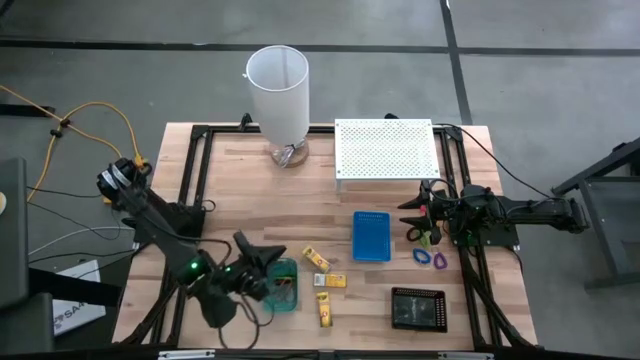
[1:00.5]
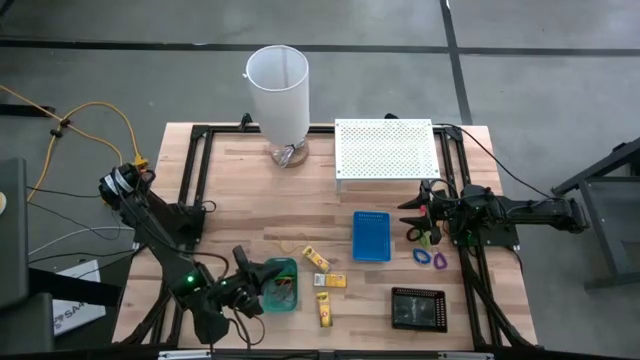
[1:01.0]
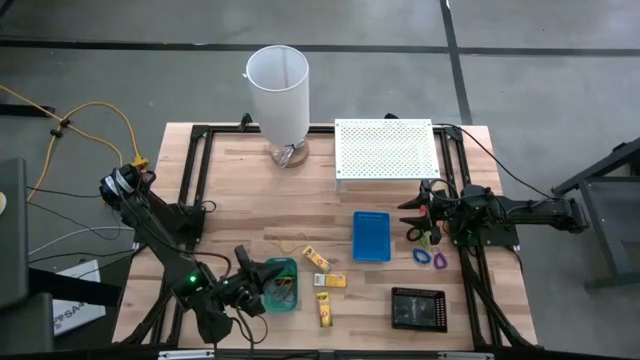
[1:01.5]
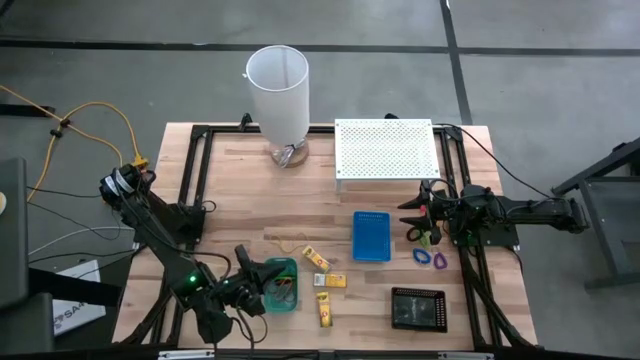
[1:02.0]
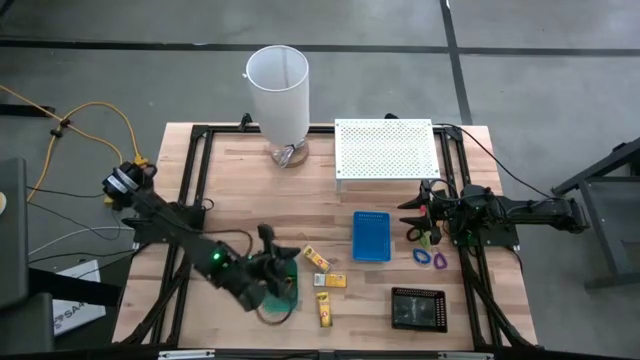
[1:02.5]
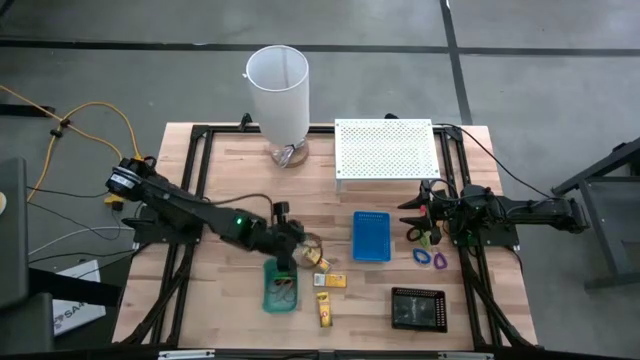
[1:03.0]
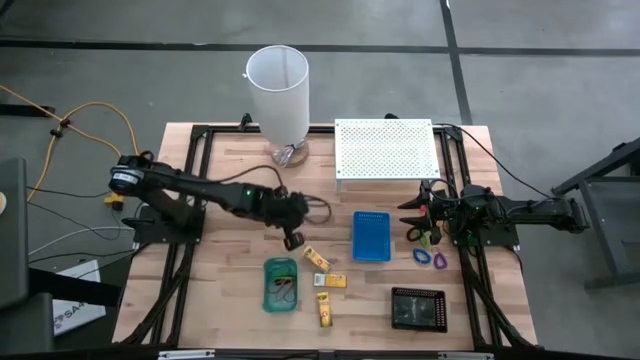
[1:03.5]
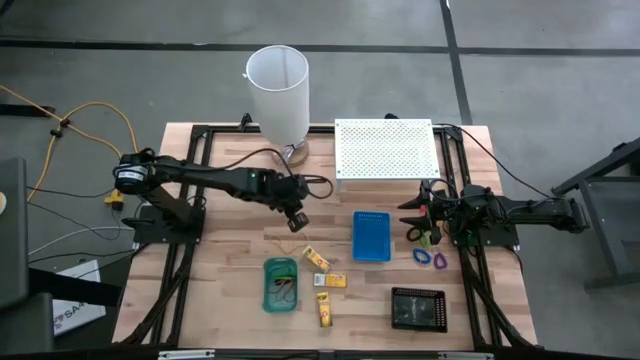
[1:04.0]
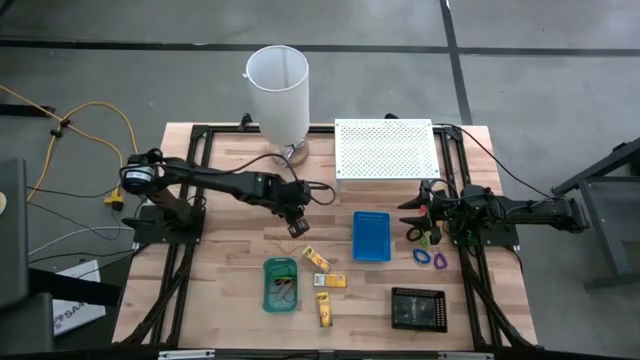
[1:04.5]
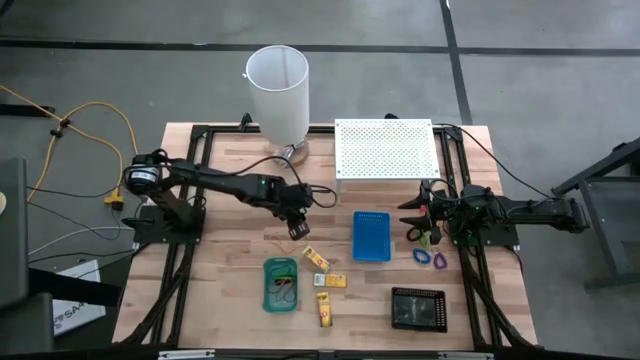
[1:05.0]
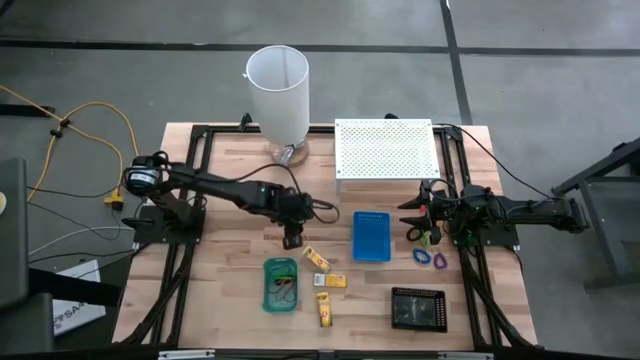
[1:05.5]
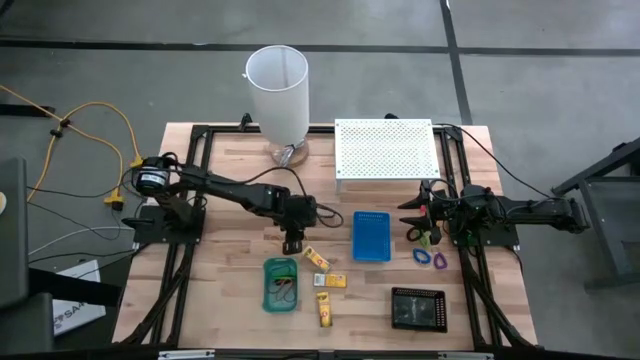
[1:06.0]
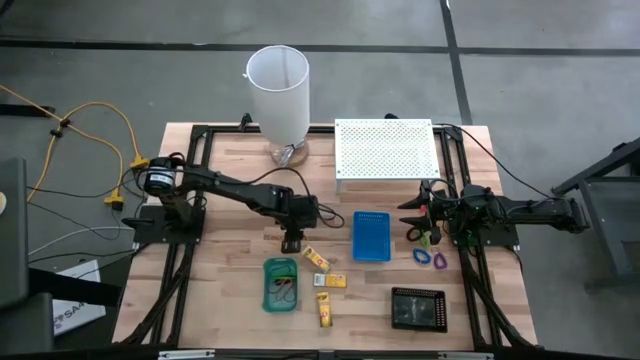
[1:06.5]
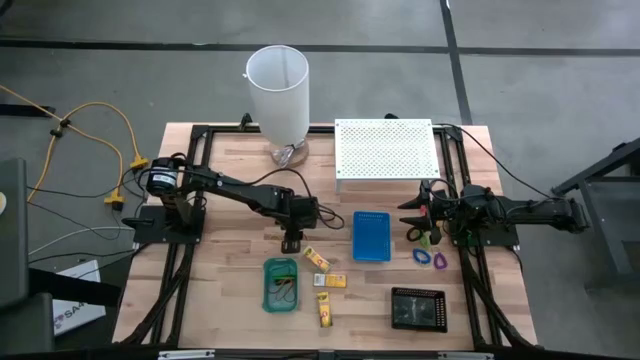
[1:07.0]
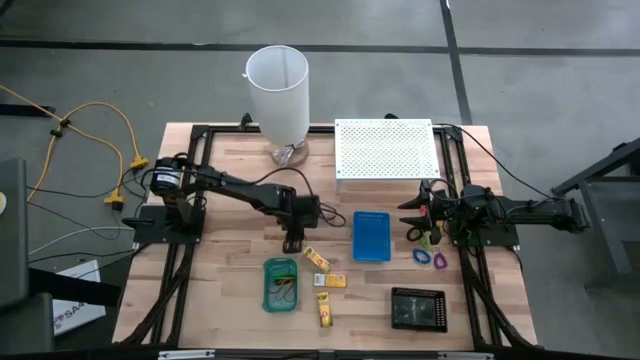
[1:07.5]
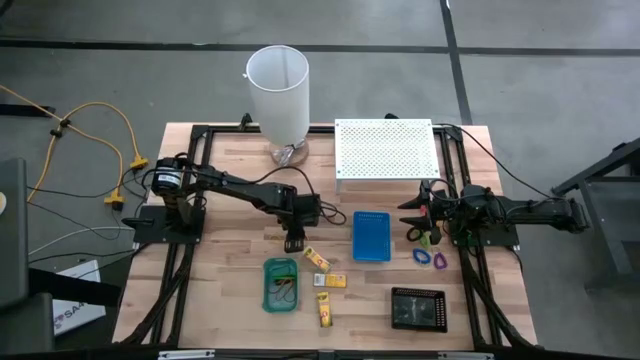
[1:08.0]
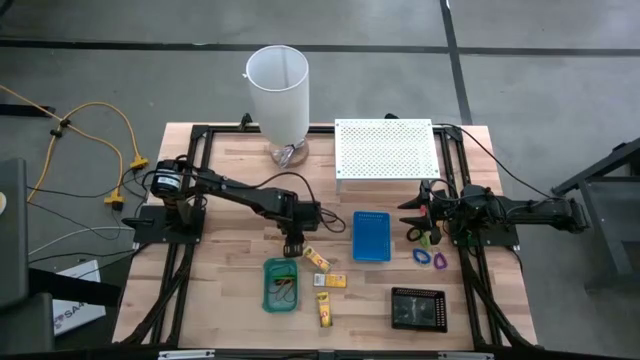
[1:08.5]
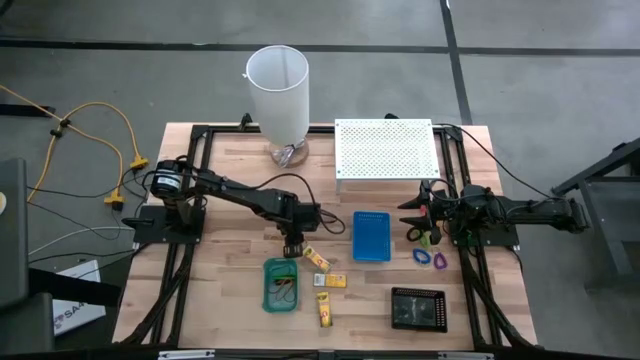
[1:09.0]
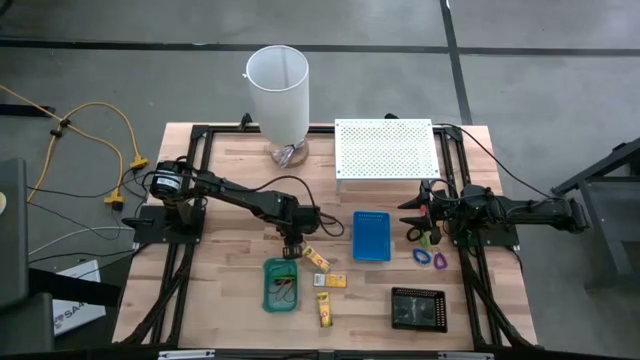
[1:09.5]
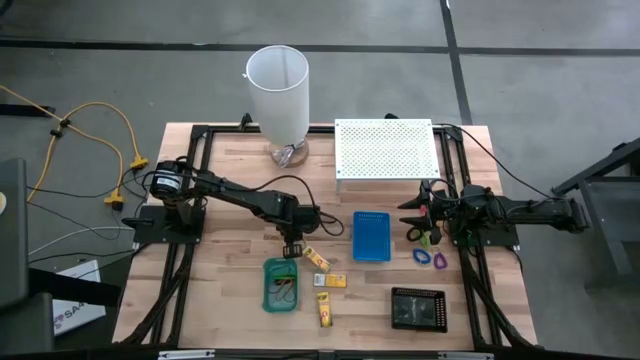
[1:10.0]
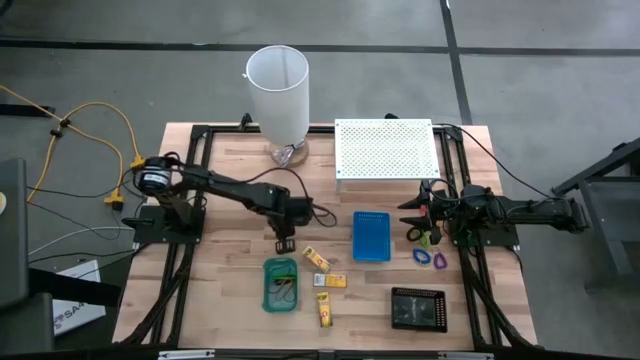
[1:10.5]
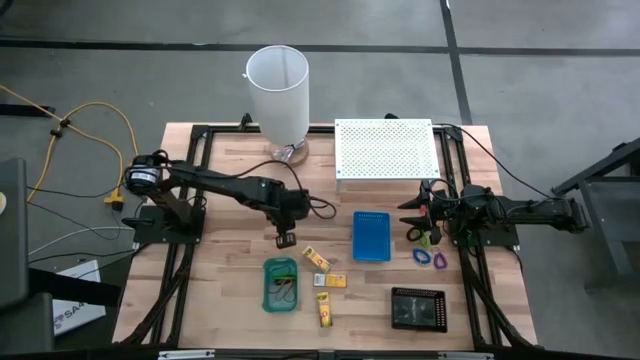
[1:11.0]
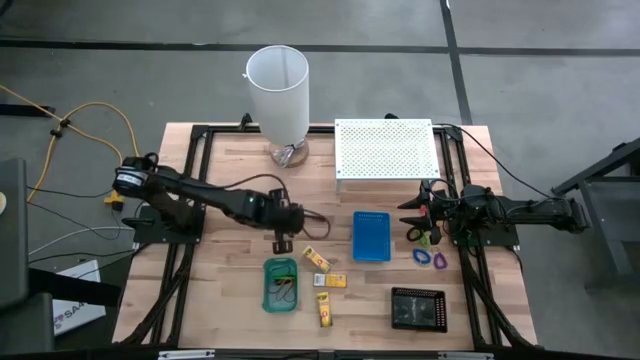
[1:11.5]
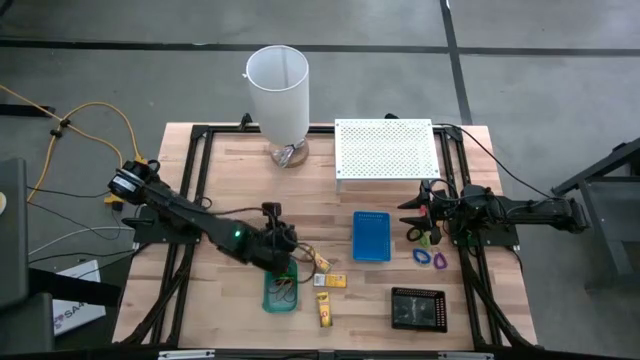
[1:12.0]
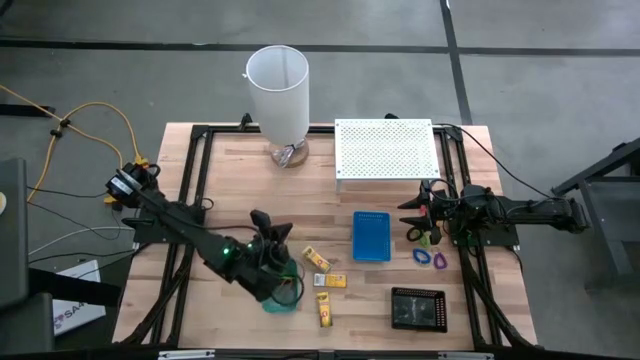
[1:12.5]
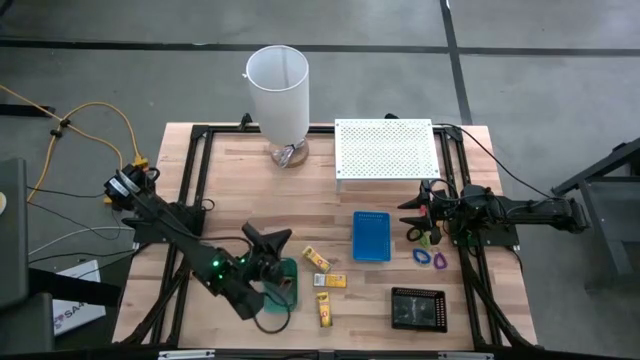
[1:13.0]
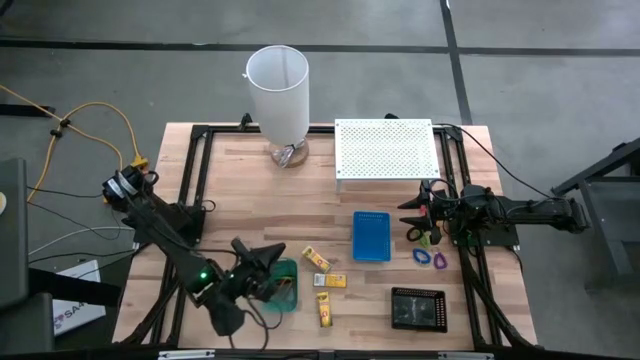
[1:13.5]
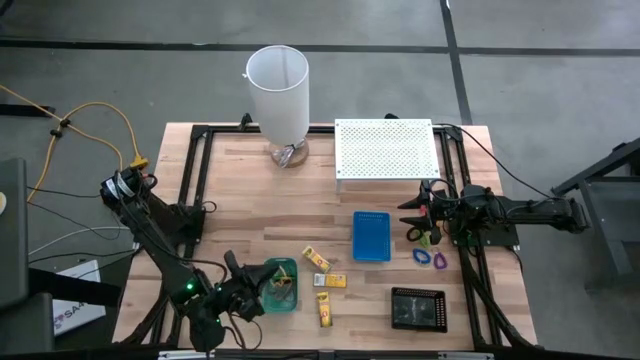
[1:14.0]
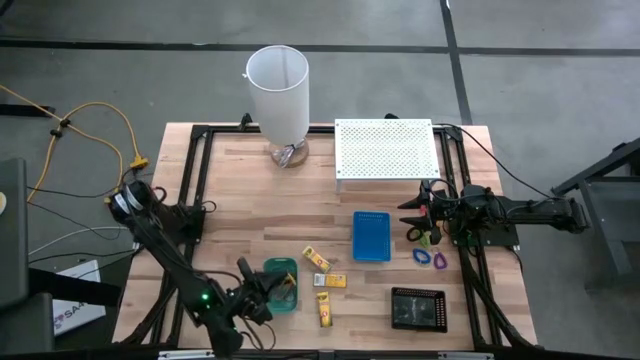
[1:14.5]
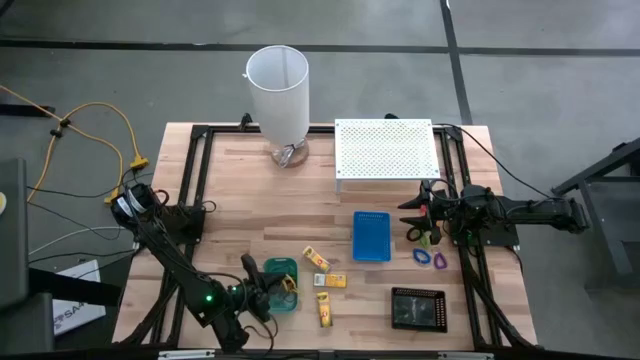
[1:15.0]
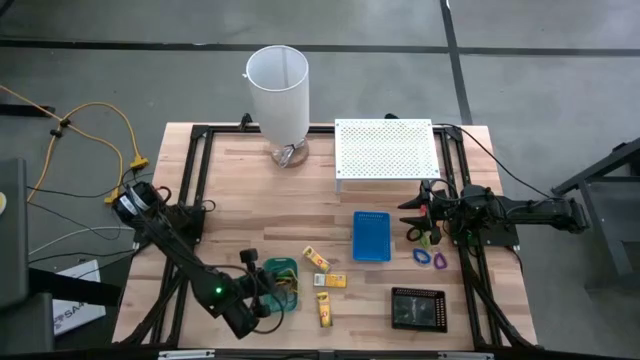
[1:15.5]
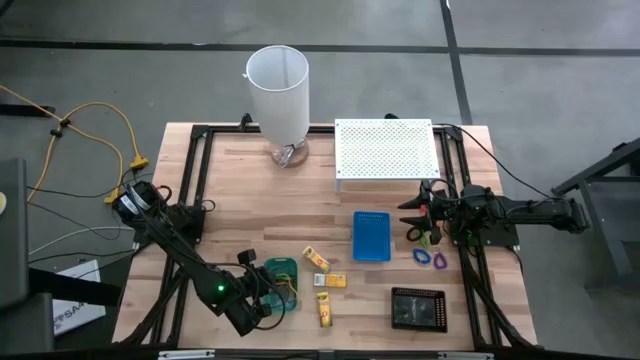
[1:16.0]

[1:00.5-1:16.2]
Task: Pick & Place Office Desk Supplies
Put the yellow rubber band into the green bin

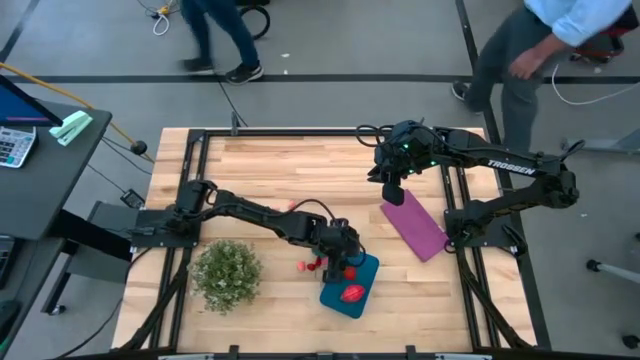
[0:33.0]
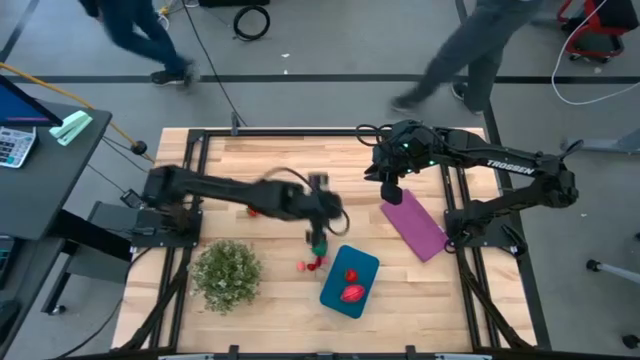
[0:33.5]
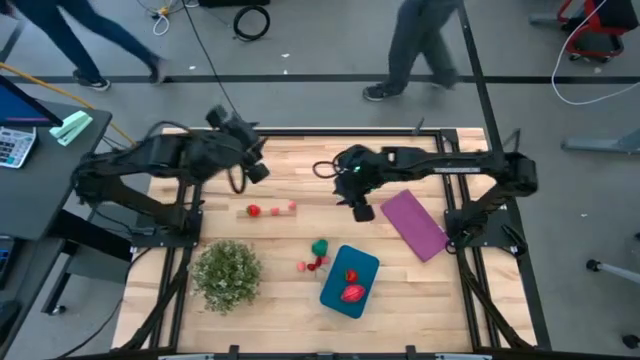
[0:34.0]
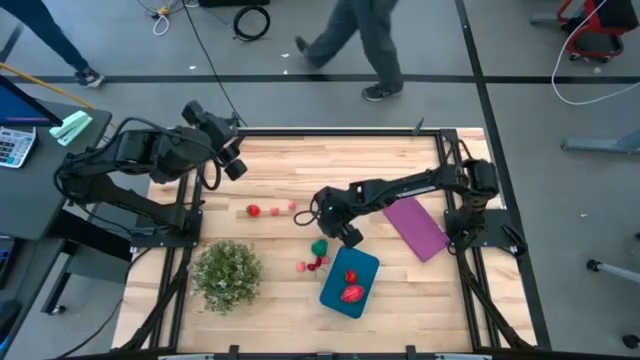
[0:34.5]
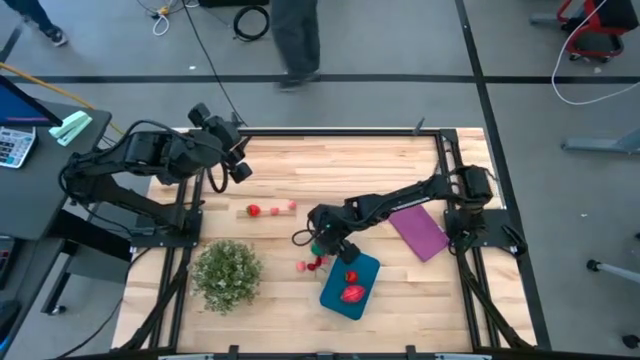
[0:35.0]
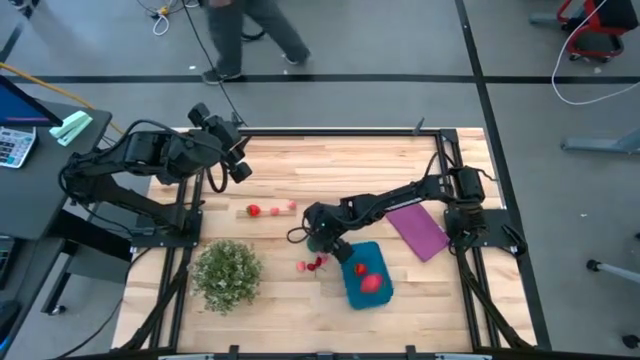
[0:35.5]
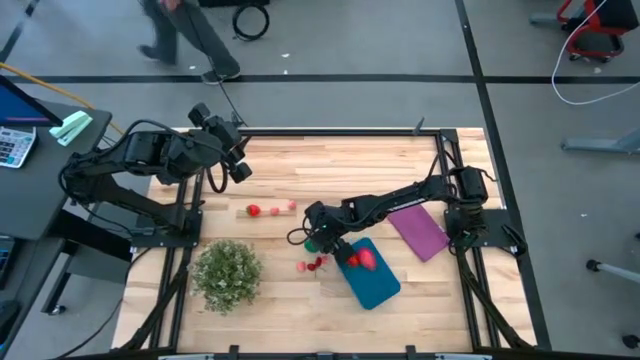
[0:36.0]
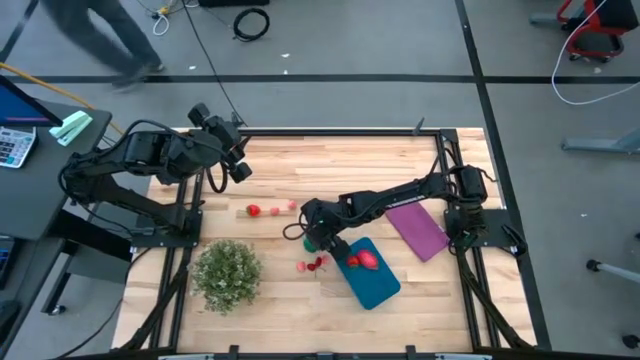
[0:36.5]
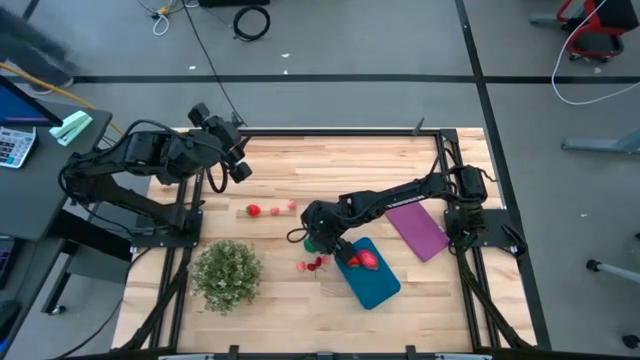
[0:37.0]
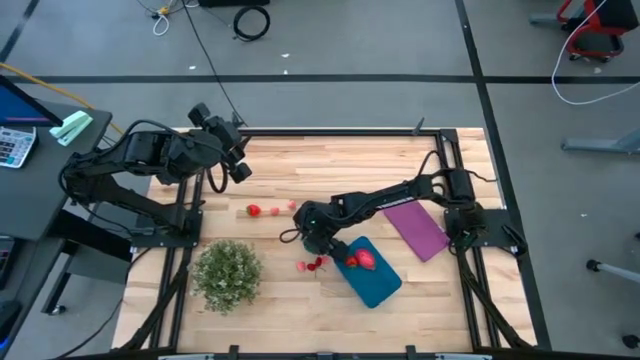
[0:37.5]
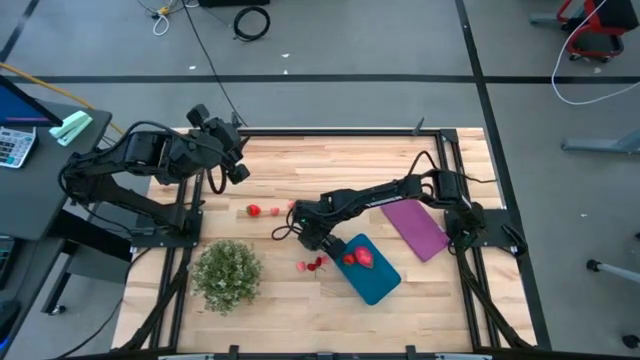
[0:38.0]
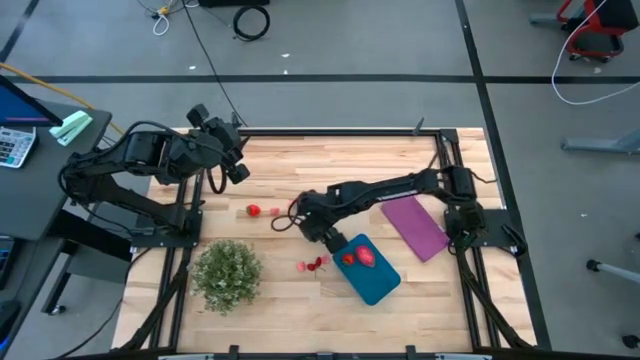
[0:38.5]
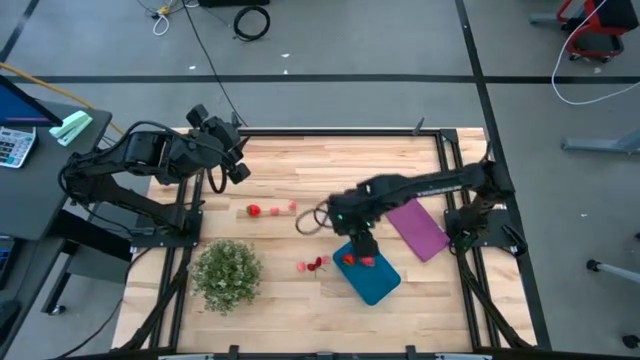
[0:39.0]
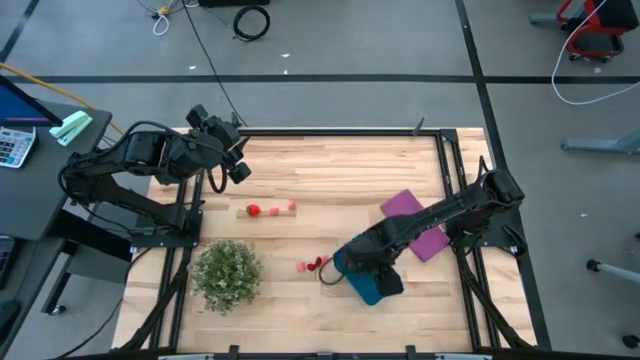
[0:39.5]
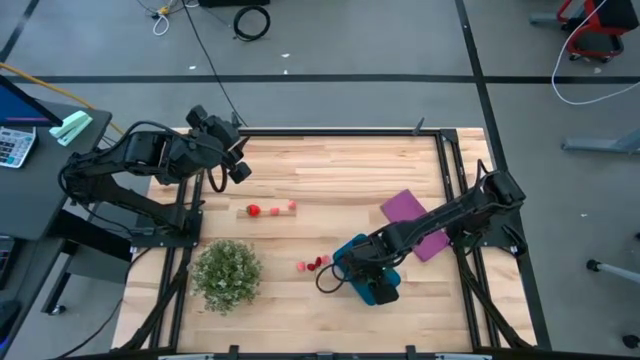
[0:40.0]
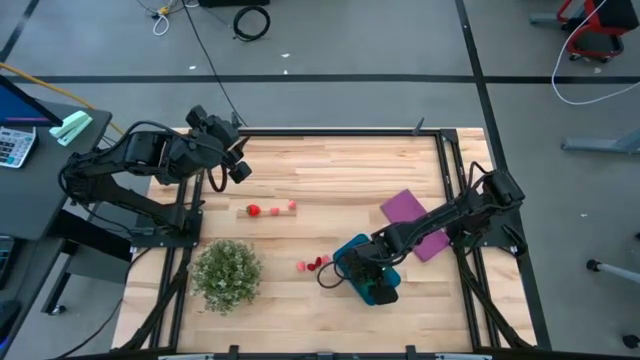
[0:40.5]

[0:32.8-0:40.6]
Task: Pick and placing Produce into tupperware
Put the green bell pepper into the blue bin
